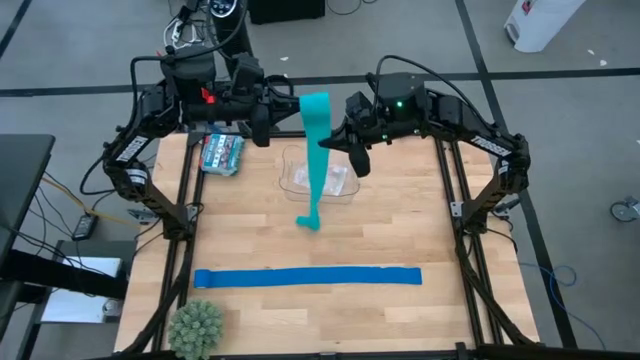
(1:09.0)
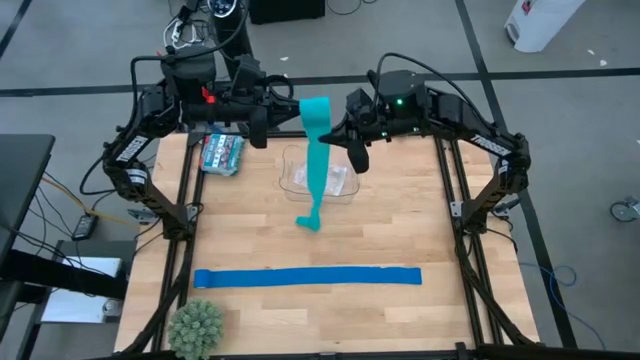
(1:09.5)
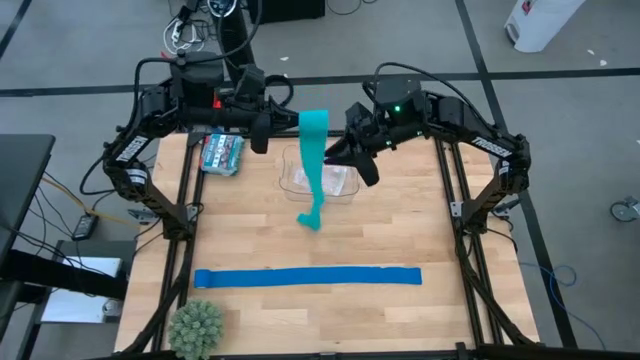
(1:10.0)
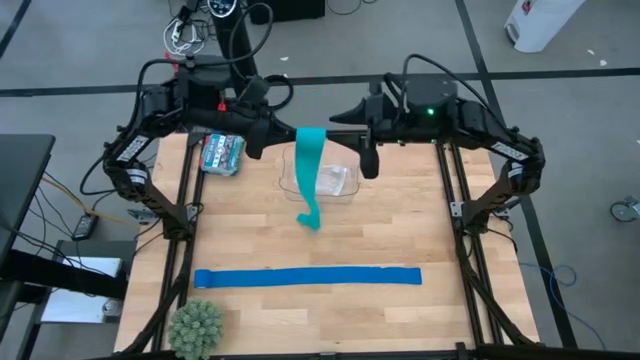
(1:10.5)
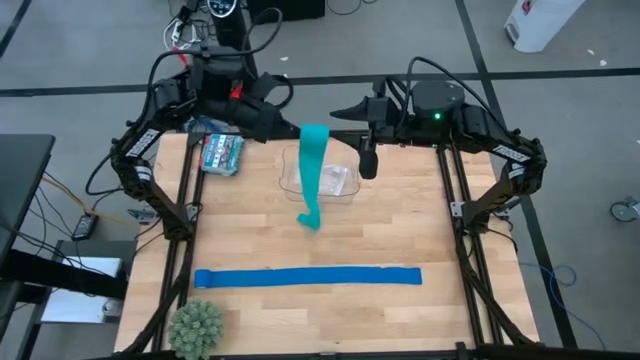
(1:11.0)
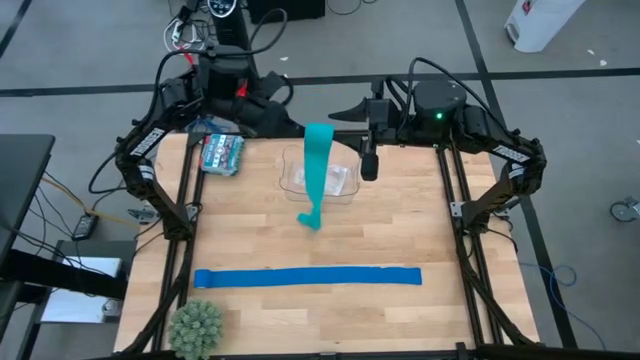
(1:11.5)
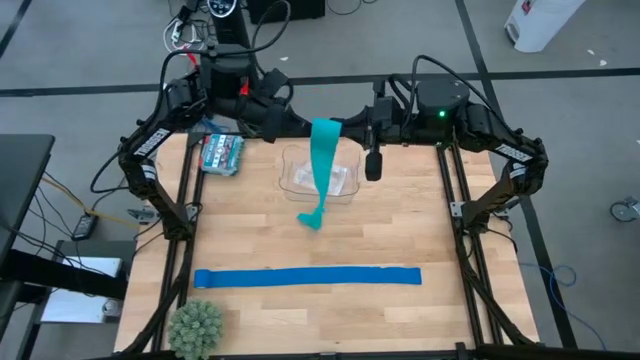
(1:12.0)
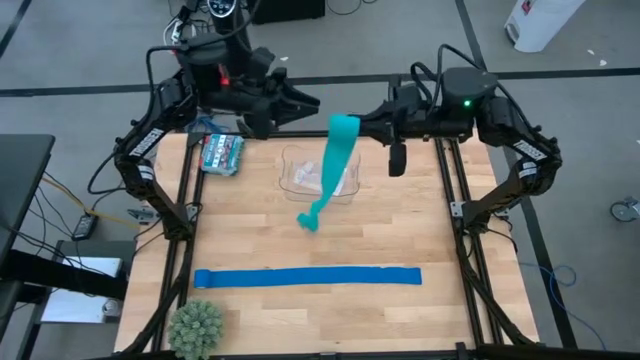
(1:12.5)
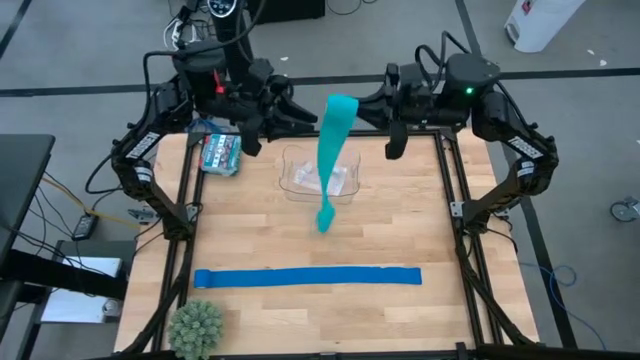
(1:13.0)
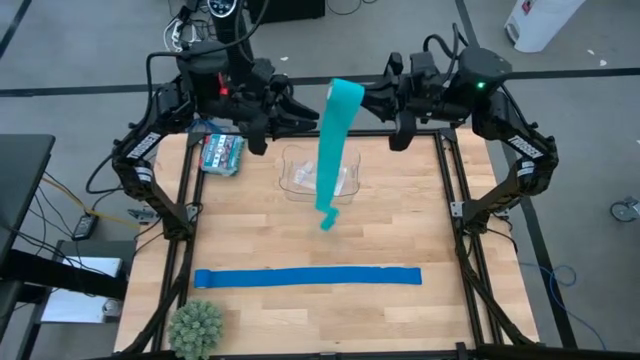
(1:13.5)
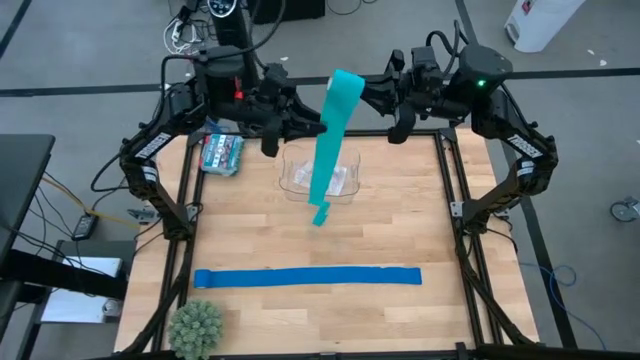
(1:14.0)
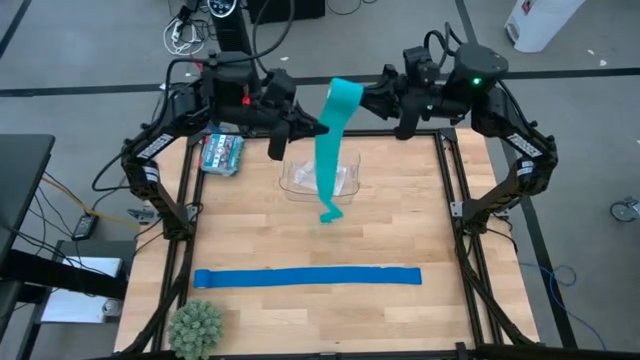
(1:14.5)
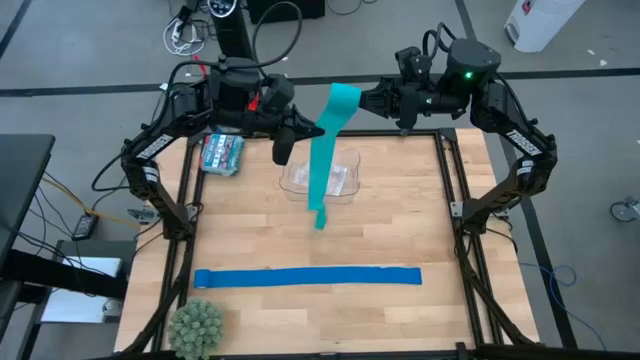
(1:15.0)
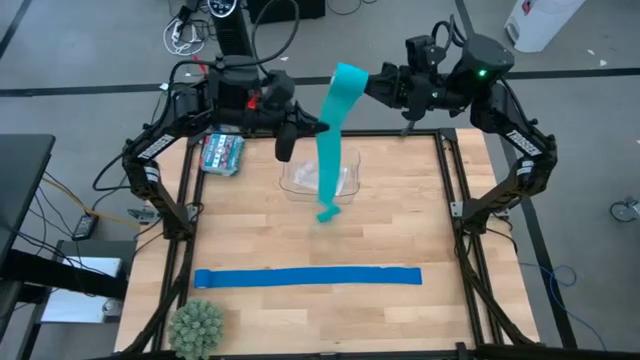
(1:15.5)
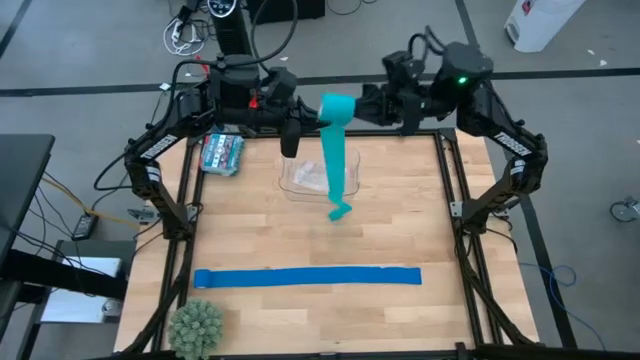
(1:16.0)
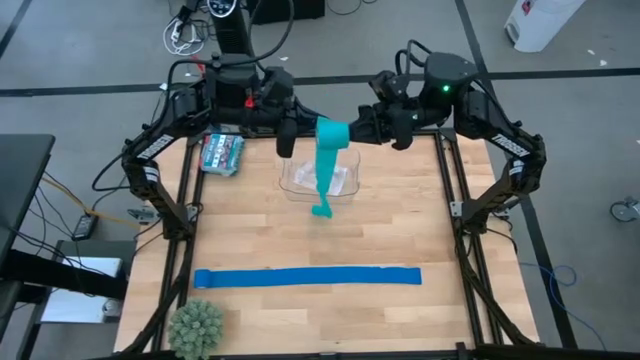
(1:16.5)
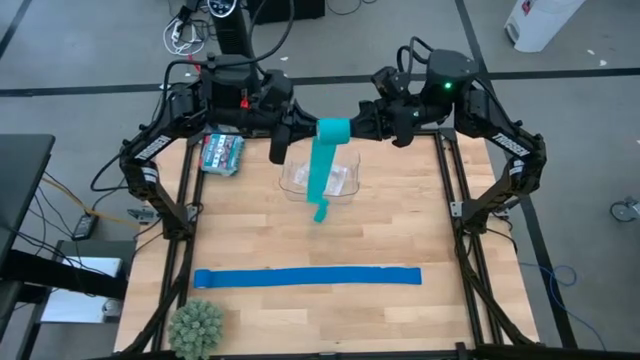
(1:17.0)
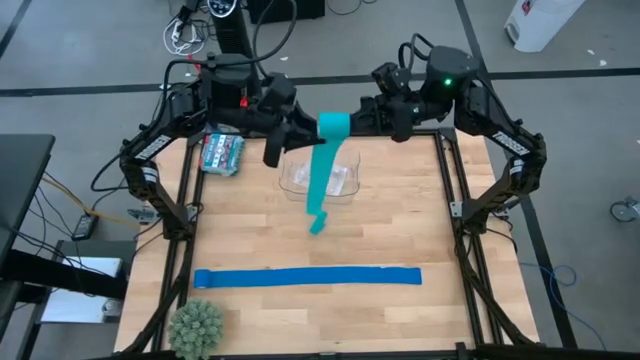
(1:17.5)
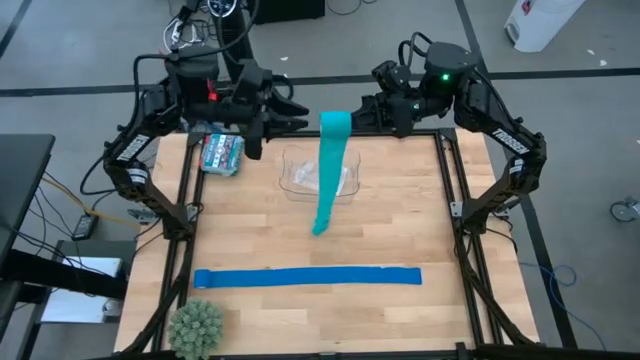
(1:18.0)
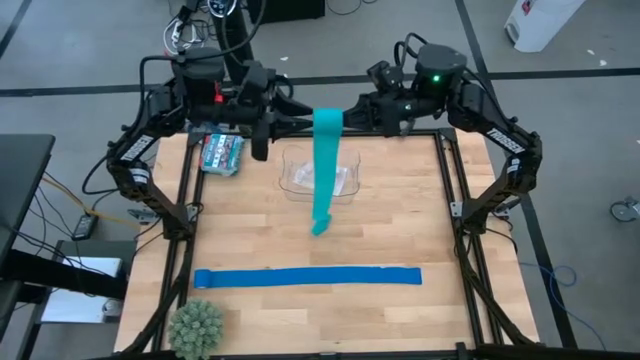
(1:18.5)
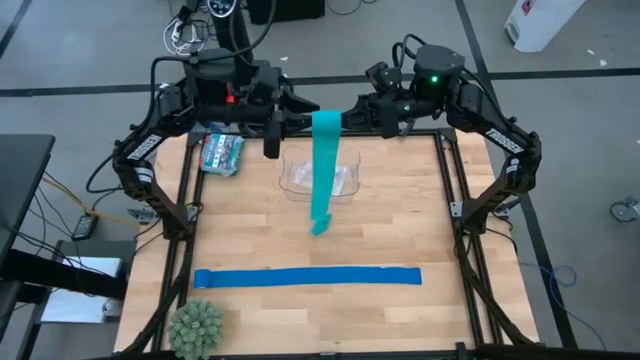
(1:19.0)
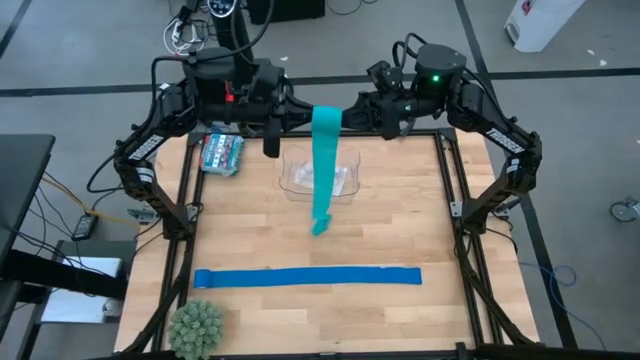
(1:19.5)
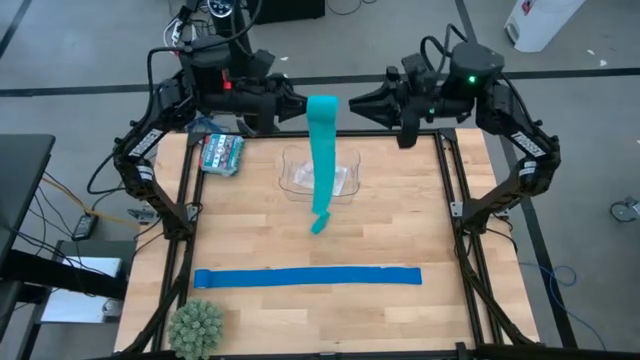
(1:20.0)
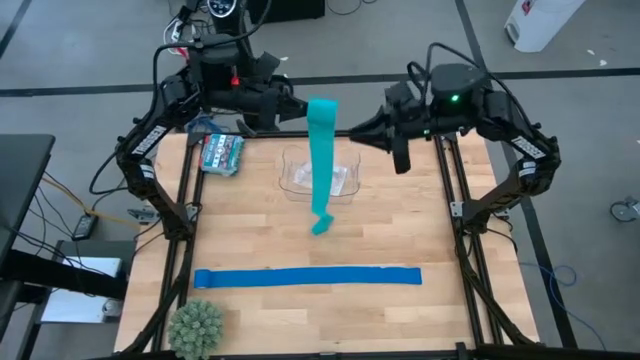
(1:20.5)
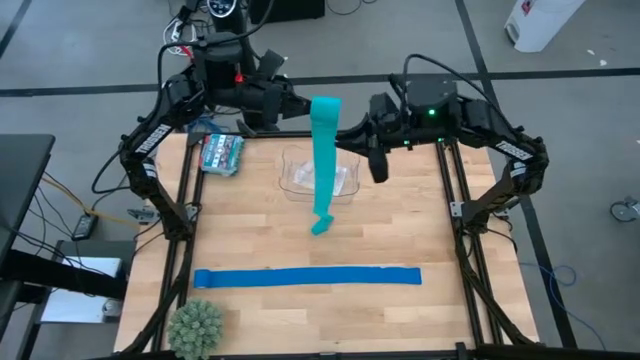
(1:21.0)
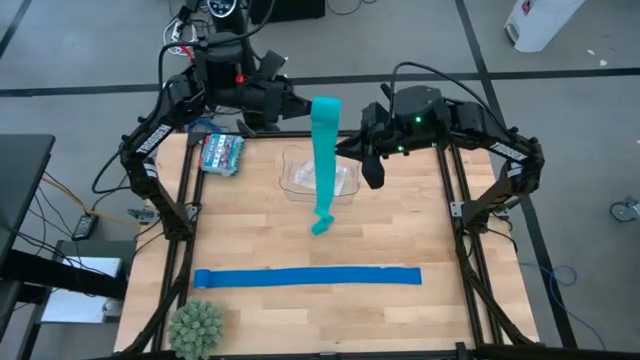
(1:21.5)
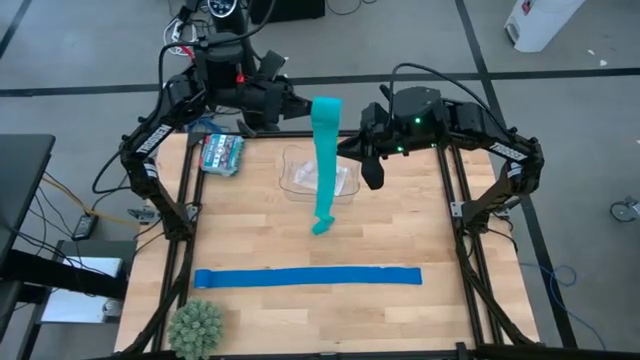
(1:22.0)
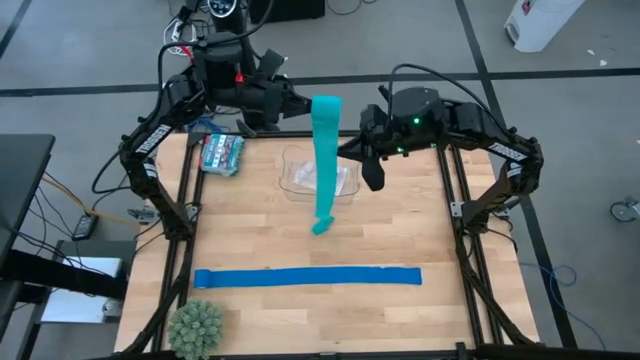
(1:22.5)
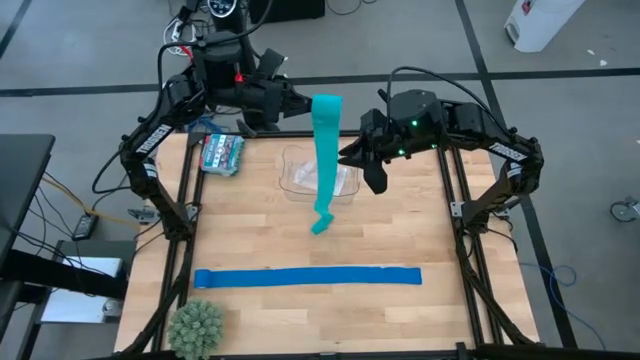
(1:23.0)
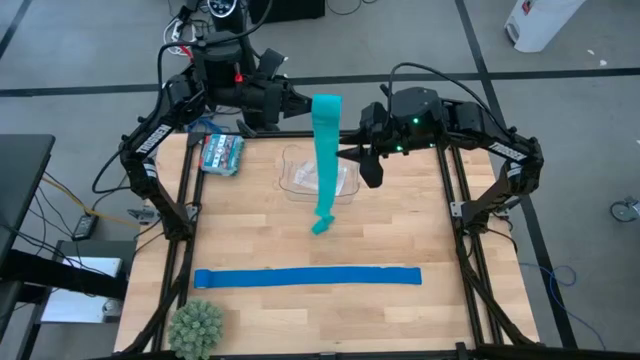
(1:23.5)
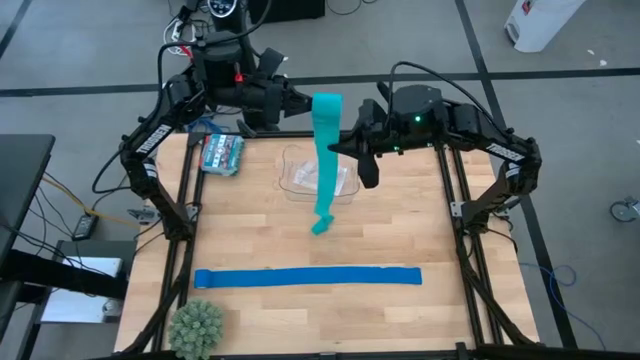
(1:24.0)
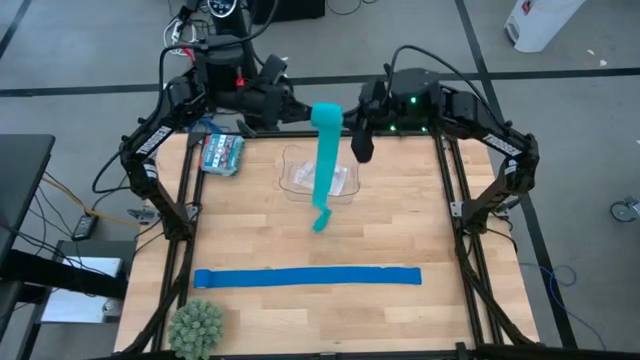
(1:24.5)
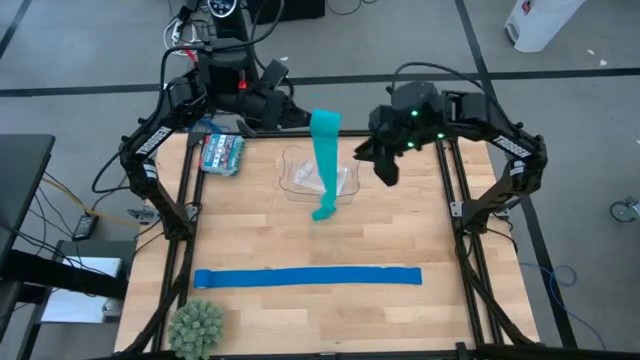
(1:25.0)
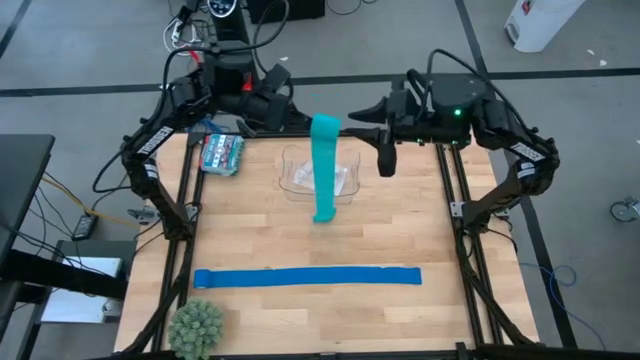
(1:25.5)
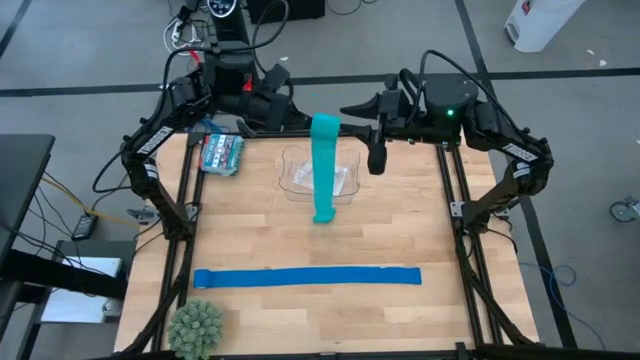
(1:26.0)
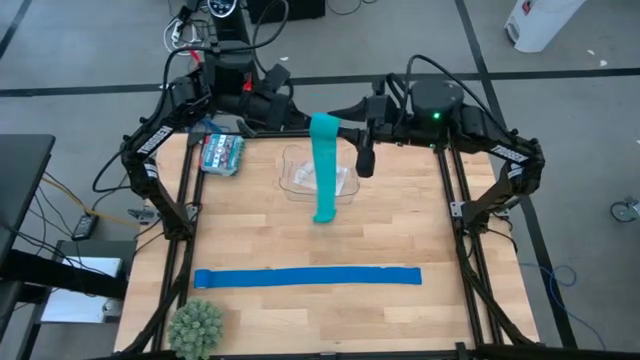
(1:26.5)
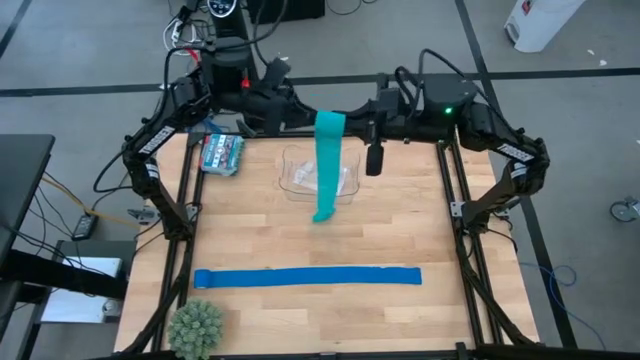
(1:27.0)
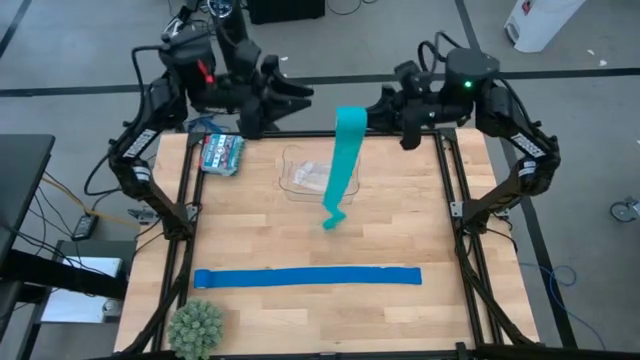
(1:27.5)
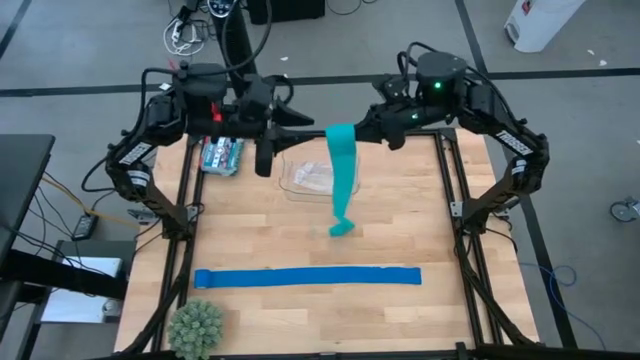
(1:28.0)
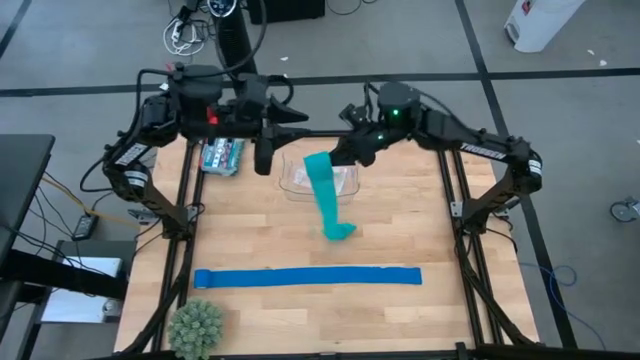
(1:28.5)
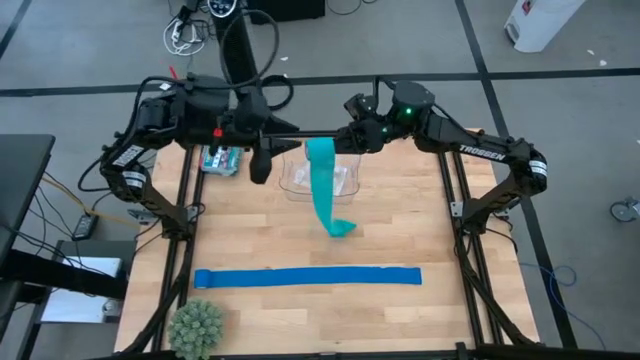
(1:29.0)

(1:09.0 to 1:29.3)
Task: Roll bandage
Roll the green bandage

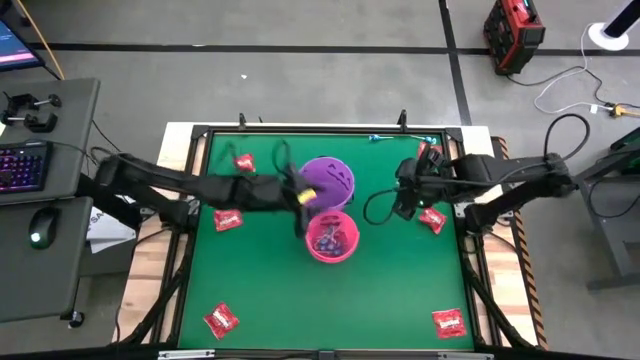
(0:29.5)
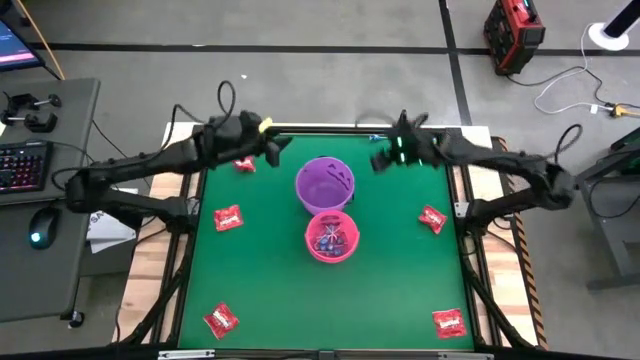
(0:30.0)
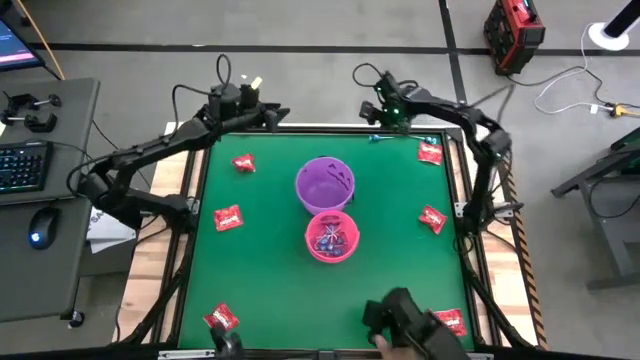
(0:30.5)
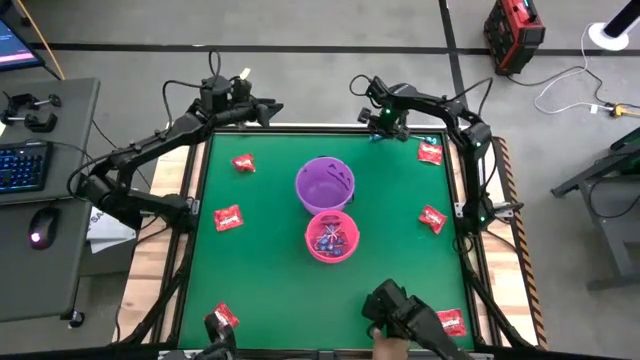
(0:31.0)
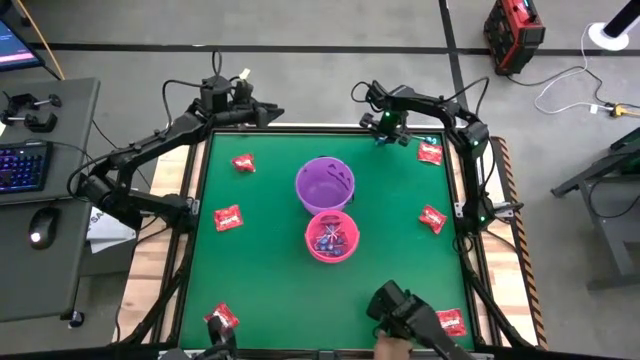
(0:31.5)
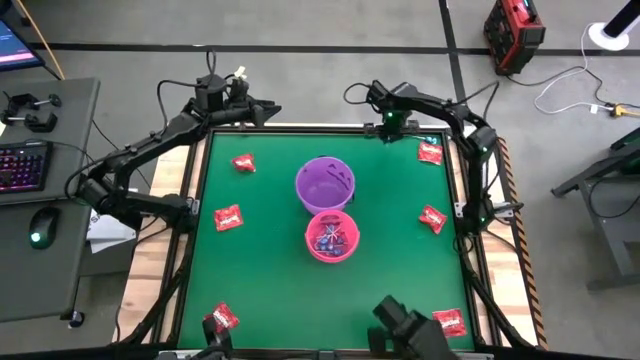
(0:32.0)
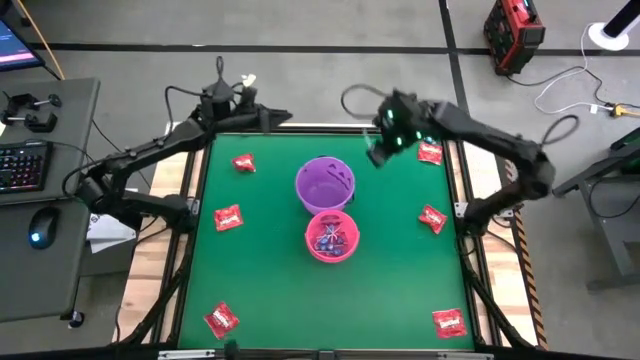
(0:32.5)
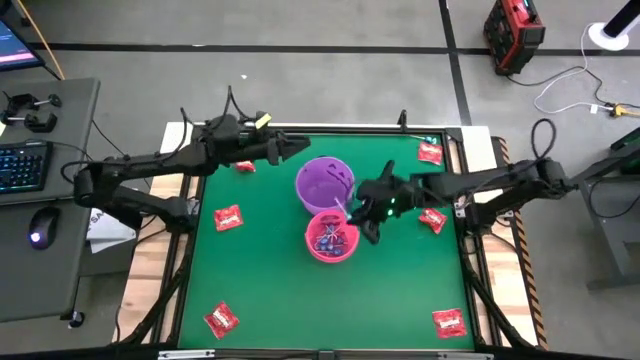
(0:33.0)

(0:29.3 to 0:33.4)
Task: Sort candy by brand, put in halloween buckets
Put the blue candy into the pink bucket
